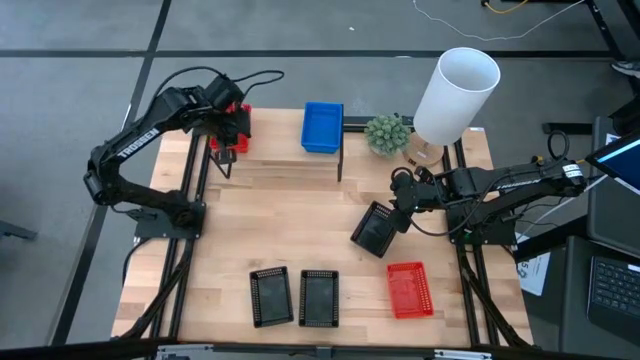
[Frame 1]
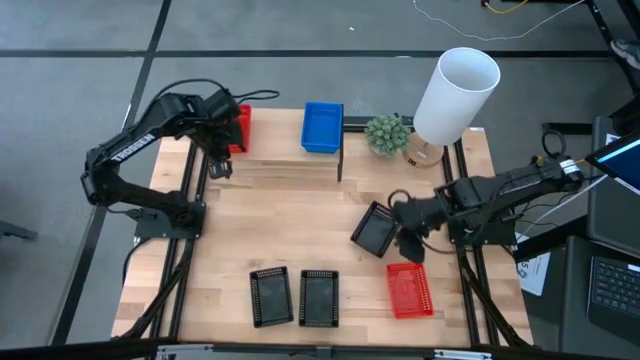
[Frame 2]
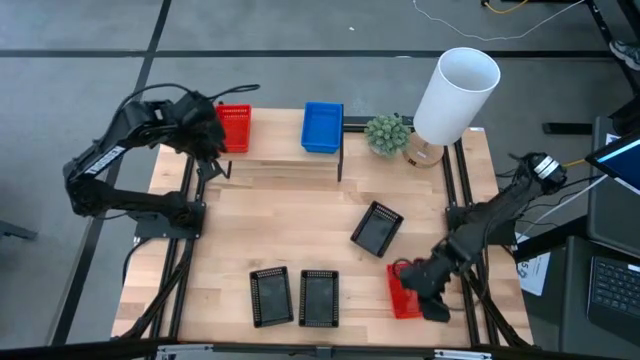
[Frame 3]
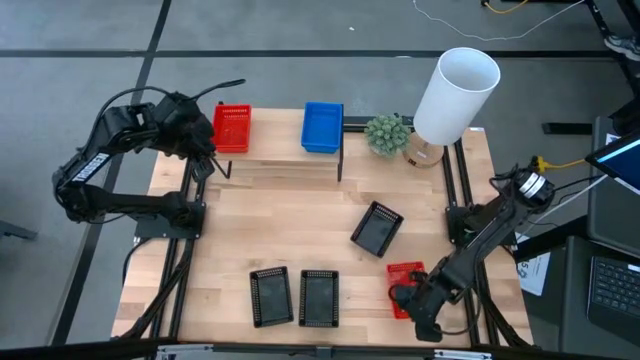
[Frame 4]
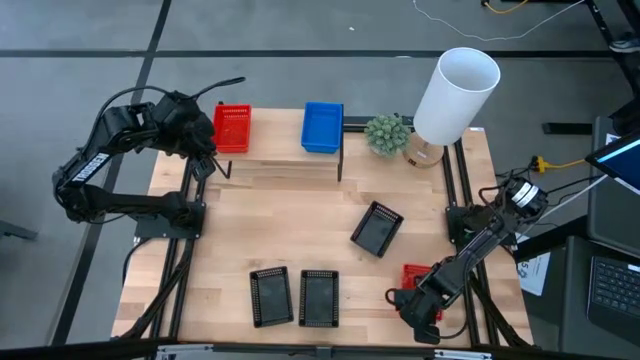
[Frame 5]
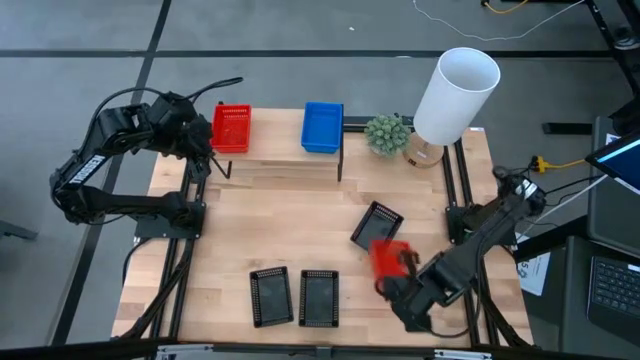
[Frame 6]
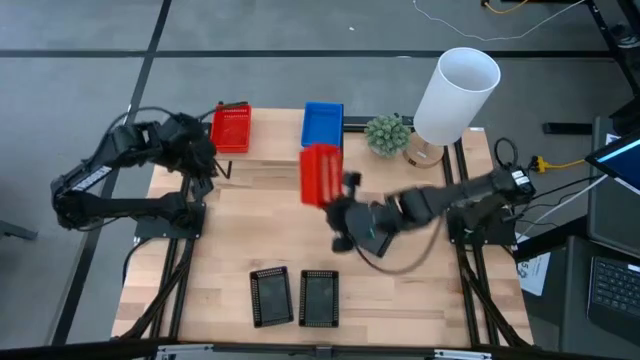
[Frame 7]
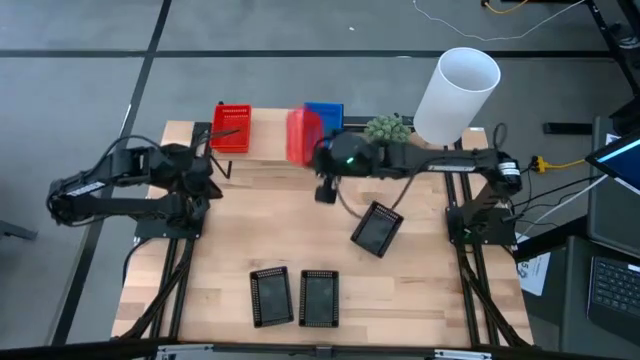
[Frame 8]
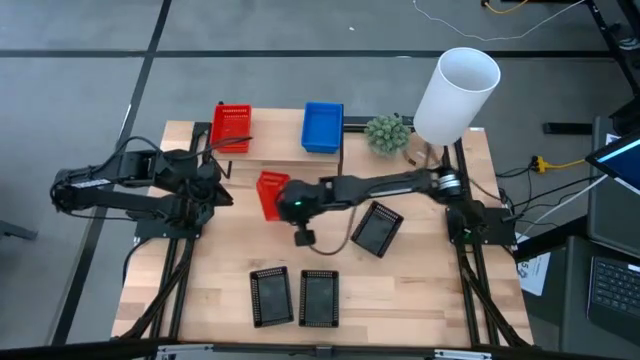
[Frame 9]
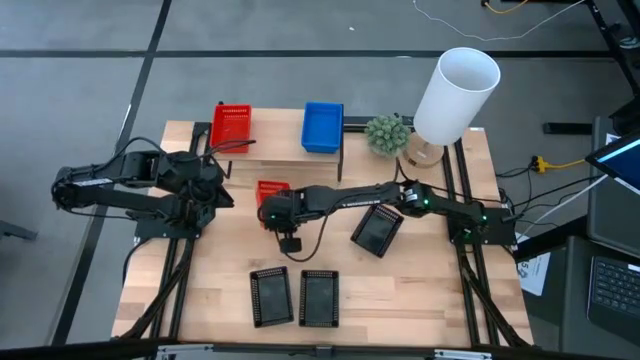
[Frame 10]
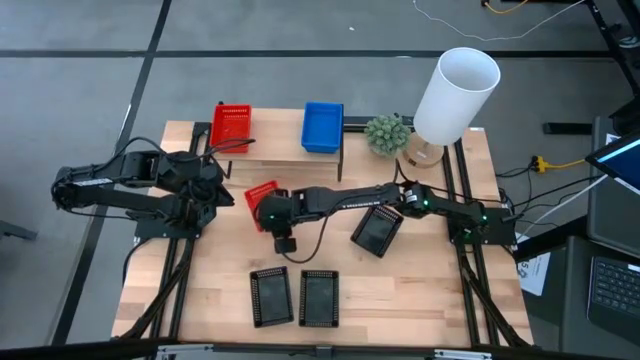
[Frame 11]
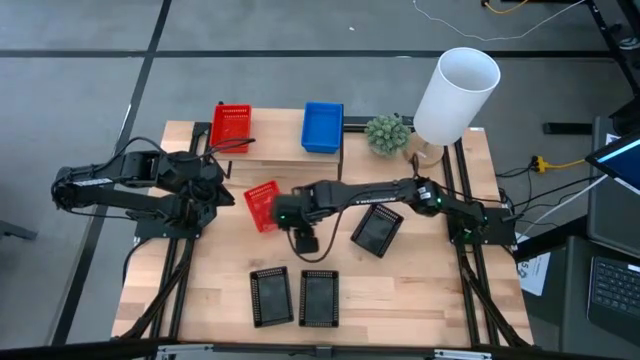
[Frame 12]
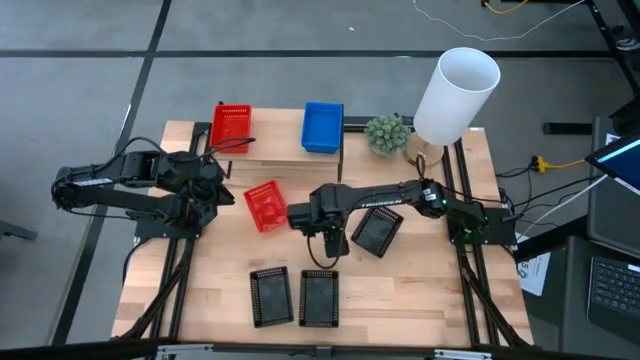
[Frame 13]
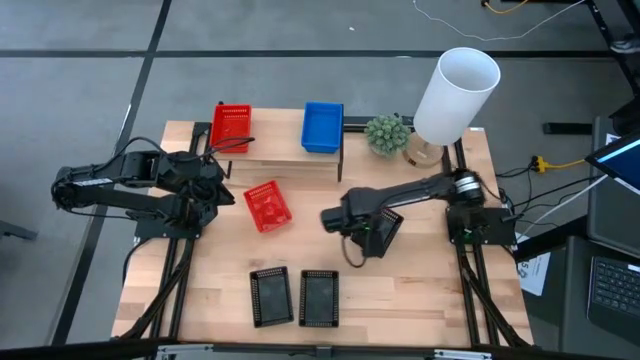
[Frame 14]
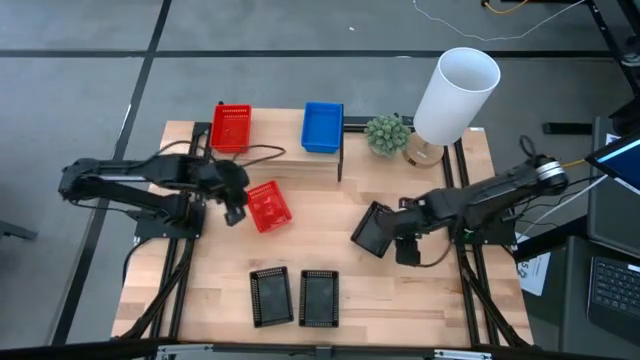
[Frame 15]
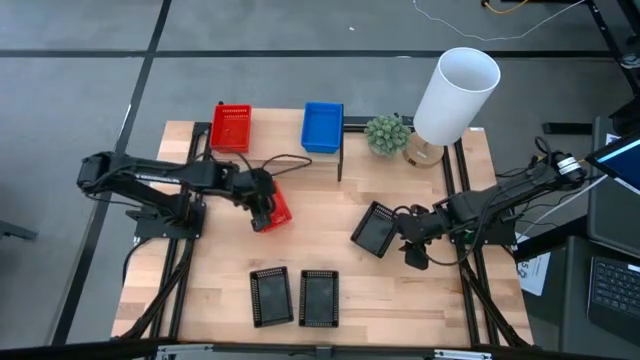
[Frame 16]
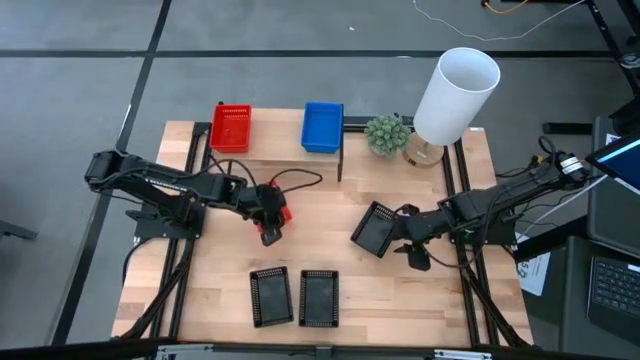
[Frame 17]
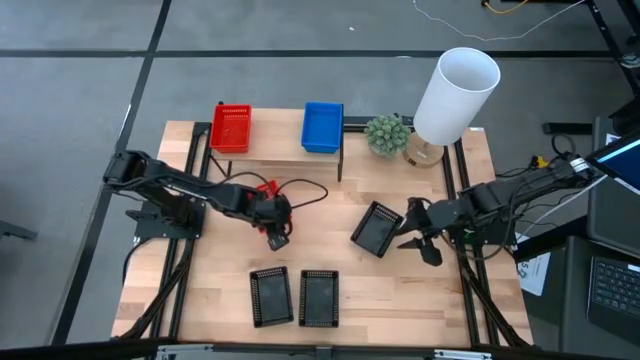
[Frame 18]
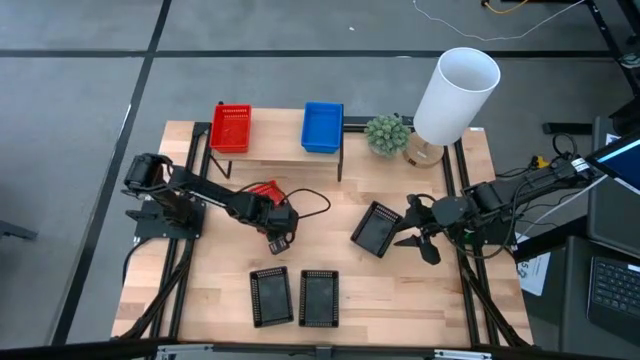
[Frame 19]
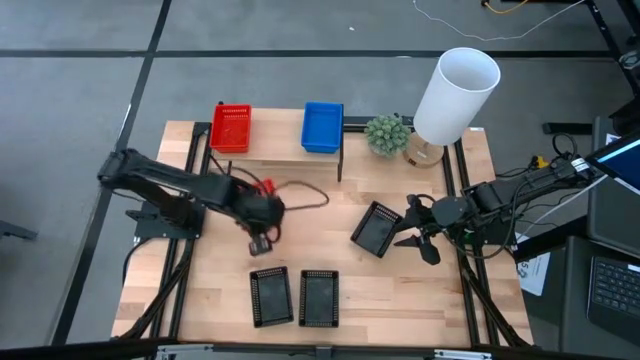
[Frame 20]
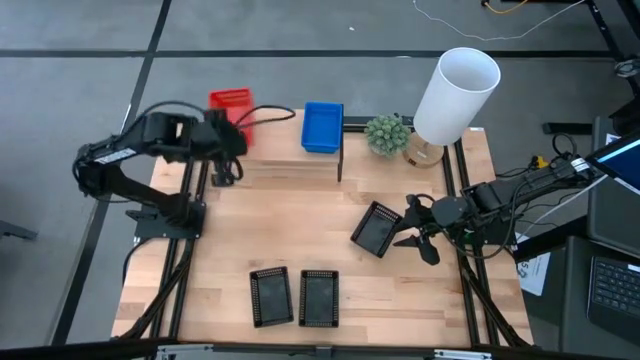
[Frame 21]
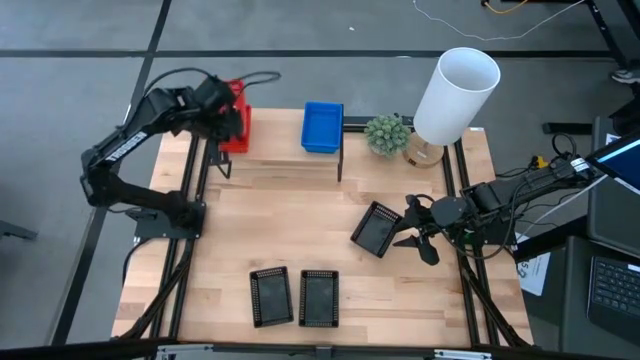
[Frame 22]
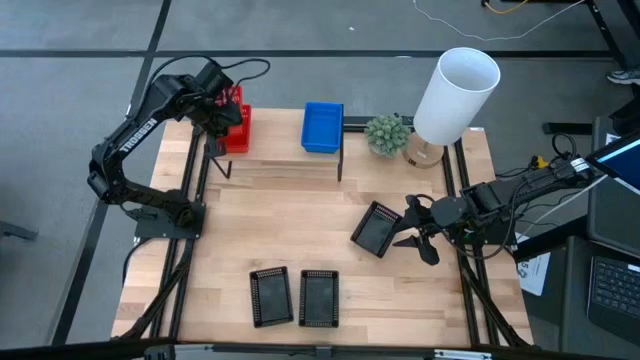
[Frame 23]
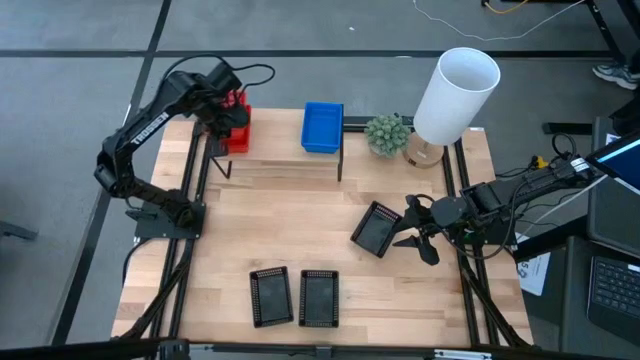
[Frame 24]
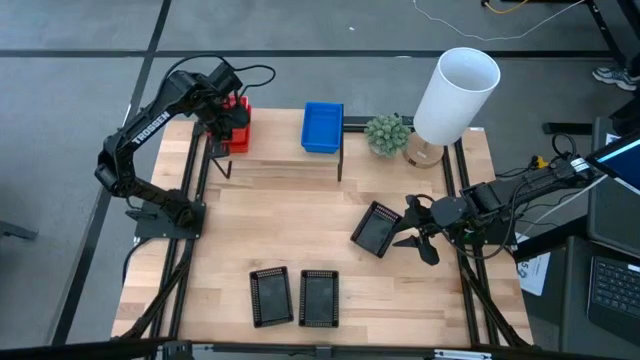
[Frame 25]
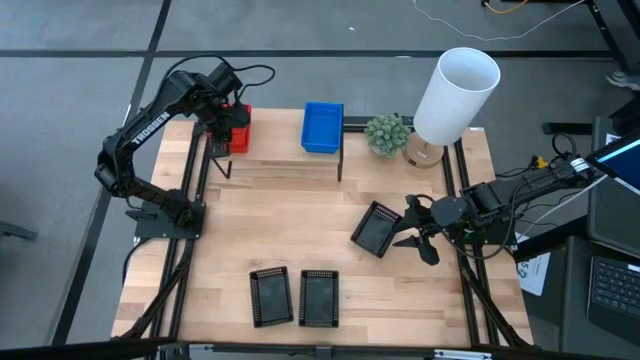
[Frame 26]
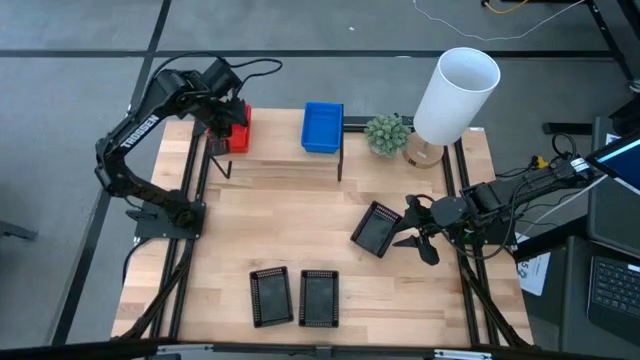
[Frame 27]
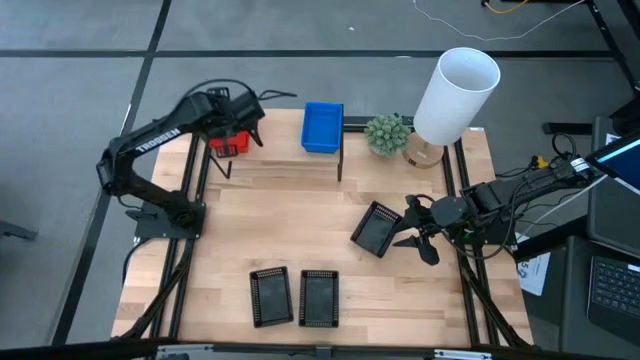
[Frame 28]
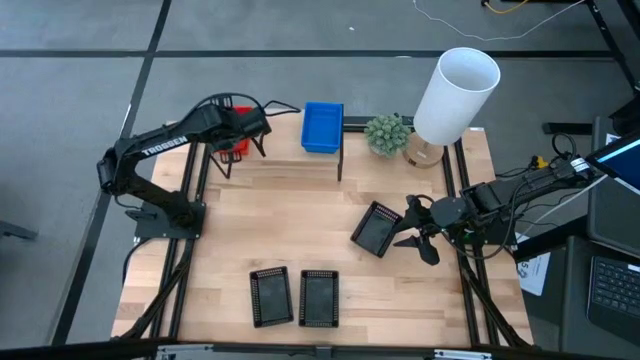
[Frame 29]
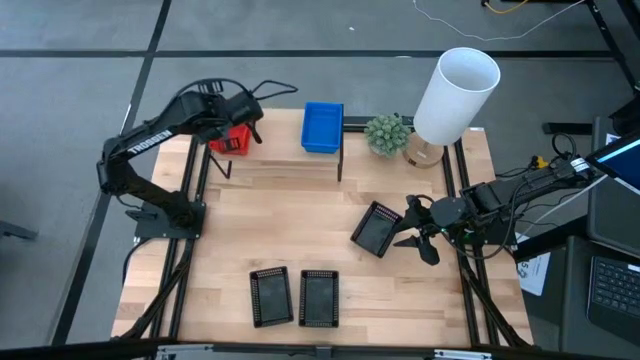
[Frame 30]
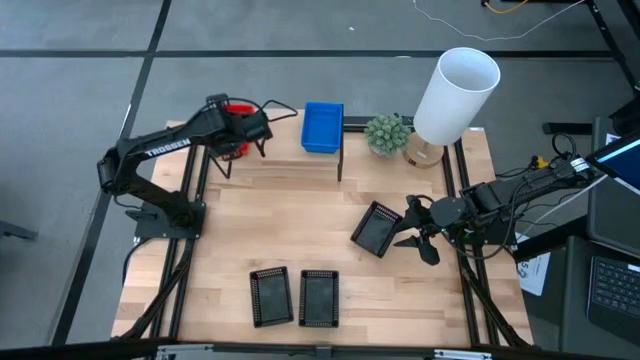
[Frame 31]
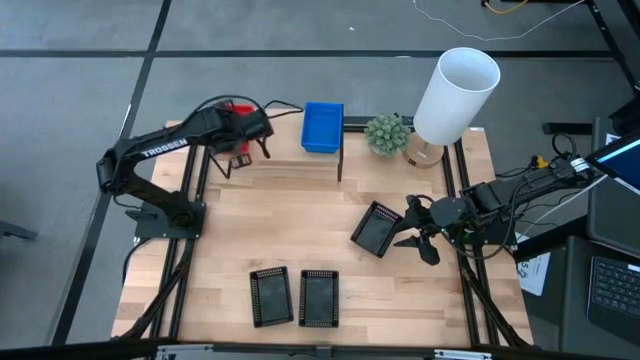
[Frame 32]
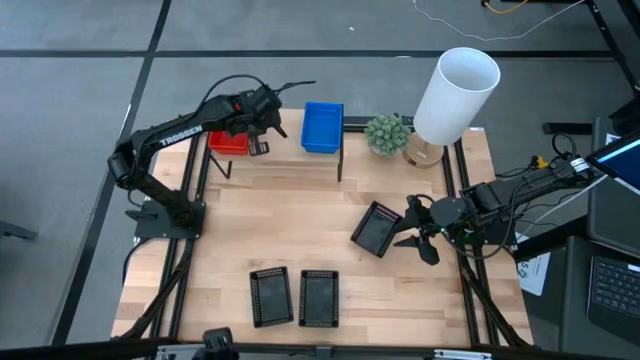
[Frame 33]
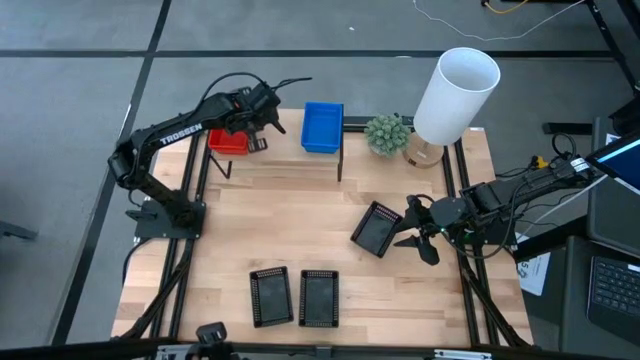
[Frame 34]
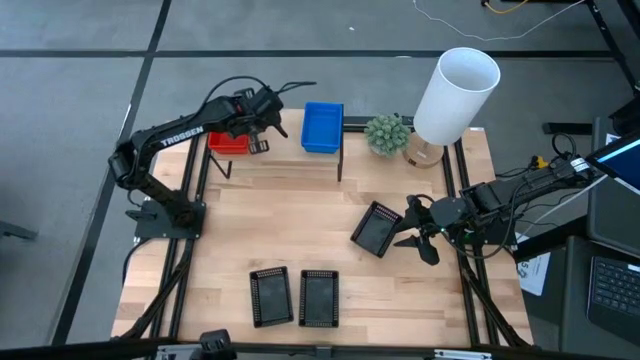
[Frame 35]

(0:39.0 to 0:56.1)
Task: Stack baskets on shelf by color
Stack the red bin on top of the stacked red bins on the shelf

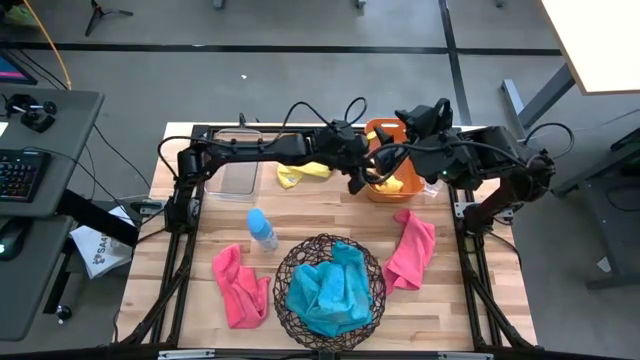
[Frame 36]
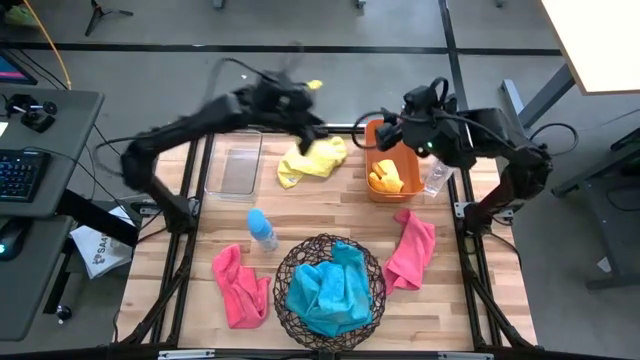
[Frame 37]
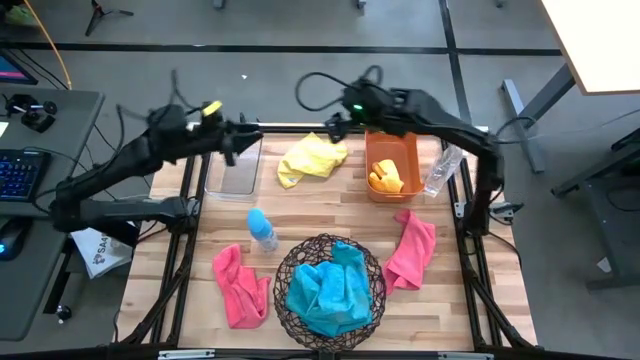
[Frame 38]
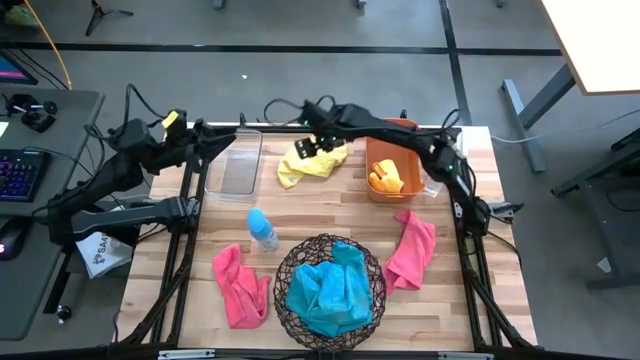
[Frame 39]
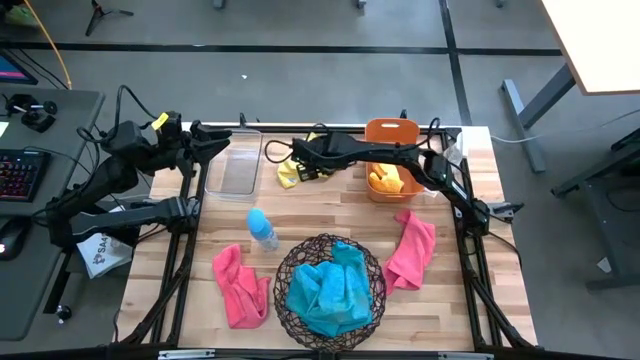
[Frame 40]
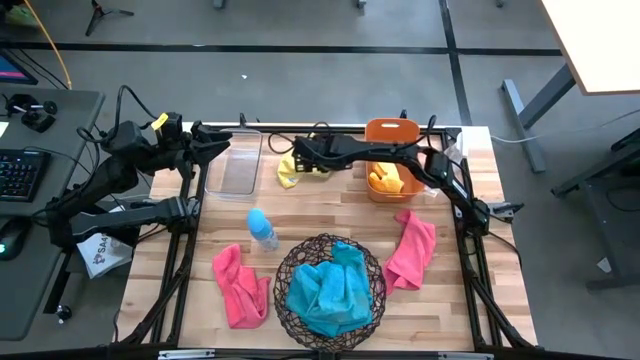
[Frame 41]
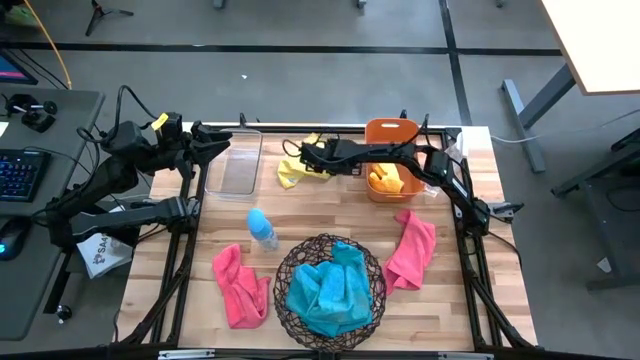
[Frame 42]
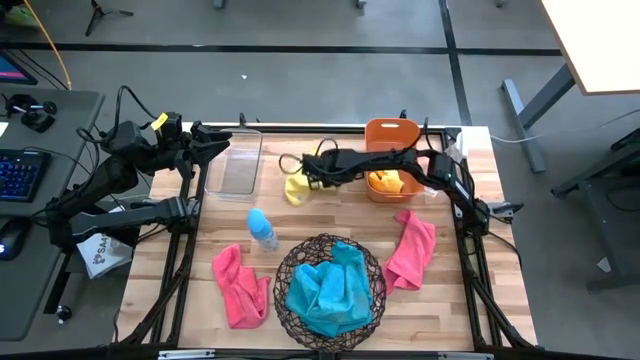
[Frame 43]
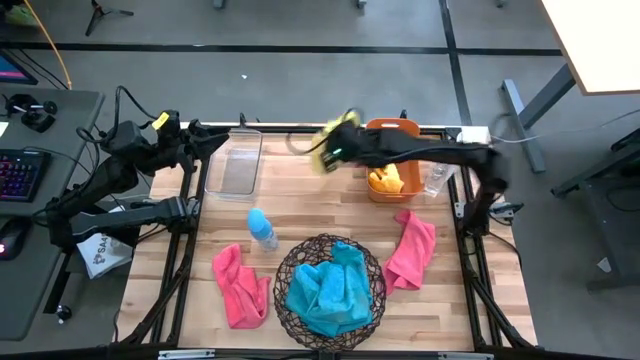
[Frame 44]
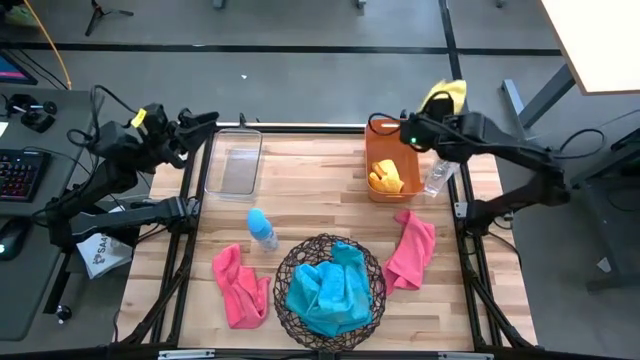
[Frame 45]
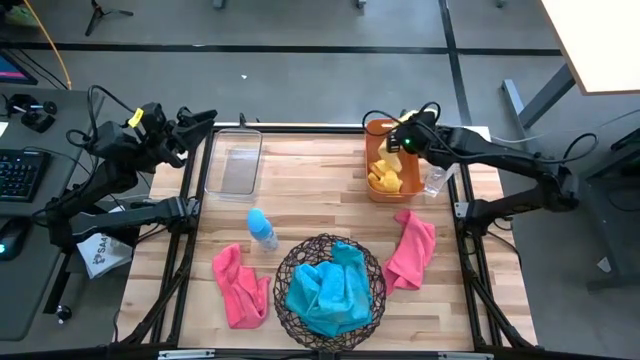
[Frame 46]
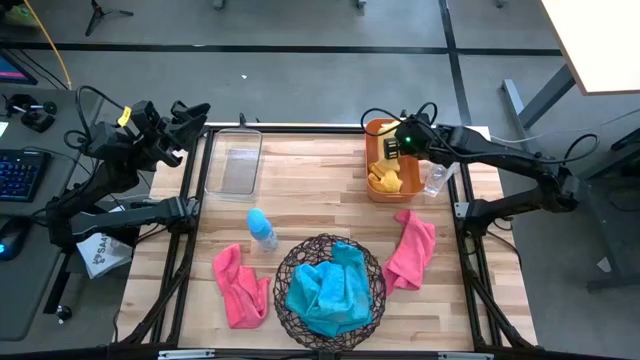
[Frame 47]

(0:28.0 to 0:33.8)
Task: Sort microfiber towel by color & place in baskets
Put the top yellow towel into the orange bin
